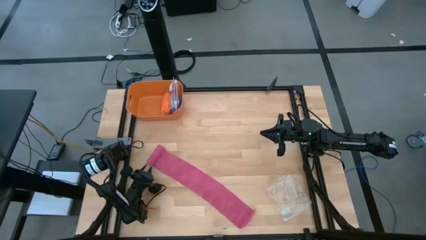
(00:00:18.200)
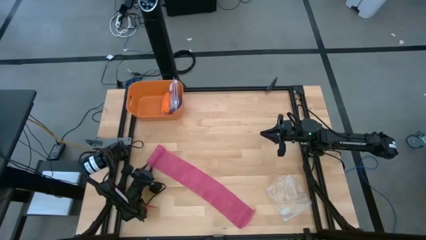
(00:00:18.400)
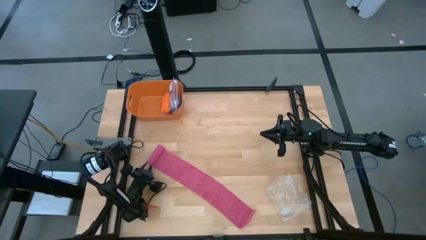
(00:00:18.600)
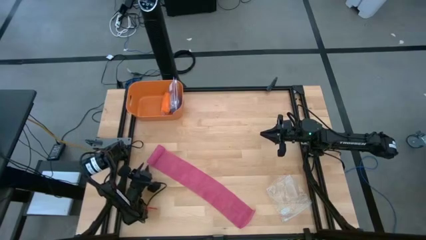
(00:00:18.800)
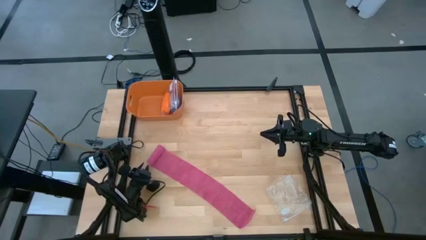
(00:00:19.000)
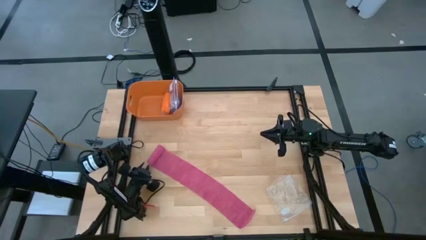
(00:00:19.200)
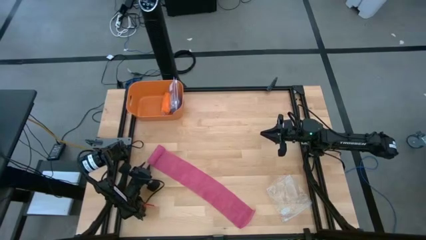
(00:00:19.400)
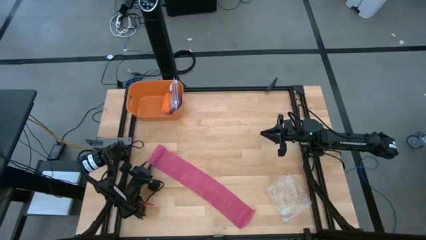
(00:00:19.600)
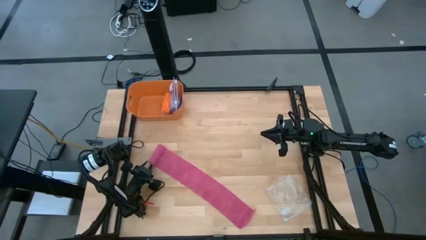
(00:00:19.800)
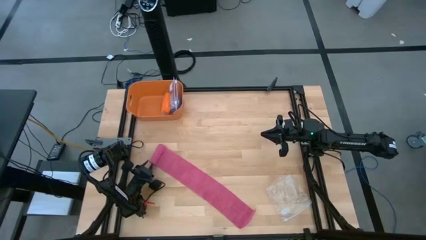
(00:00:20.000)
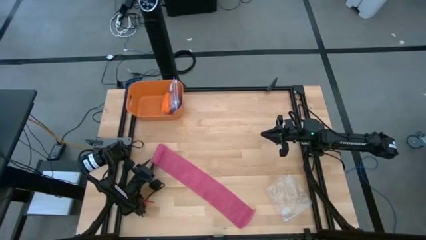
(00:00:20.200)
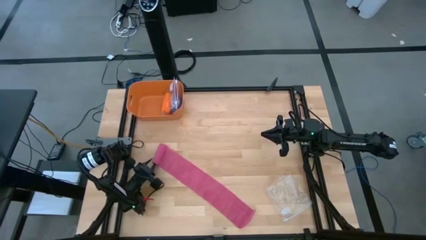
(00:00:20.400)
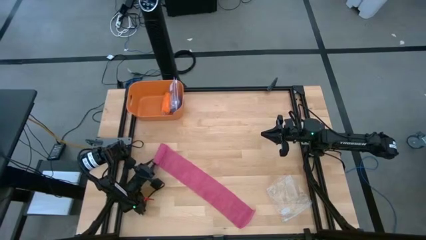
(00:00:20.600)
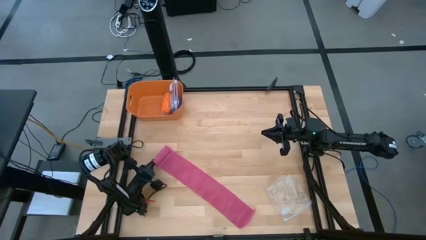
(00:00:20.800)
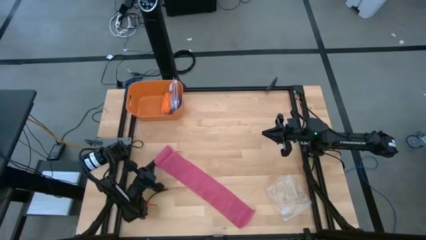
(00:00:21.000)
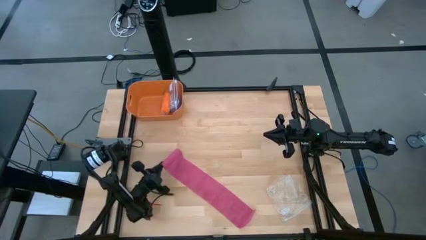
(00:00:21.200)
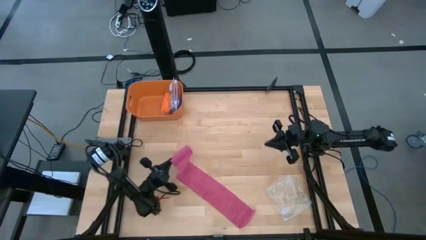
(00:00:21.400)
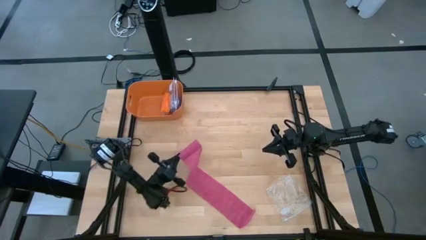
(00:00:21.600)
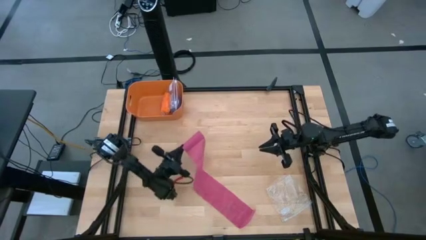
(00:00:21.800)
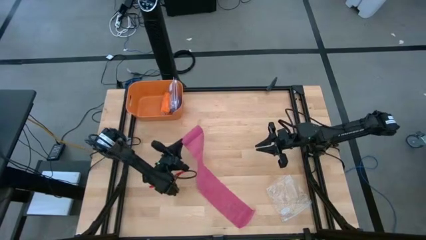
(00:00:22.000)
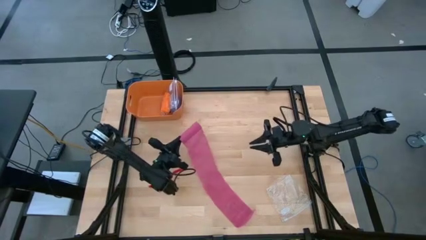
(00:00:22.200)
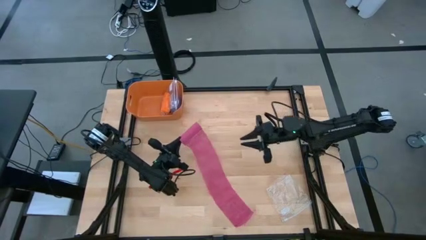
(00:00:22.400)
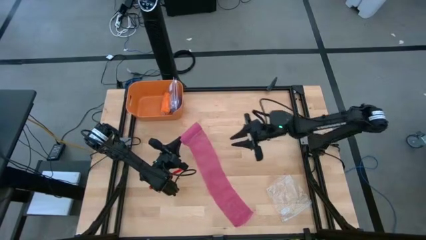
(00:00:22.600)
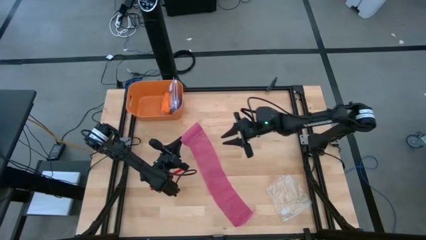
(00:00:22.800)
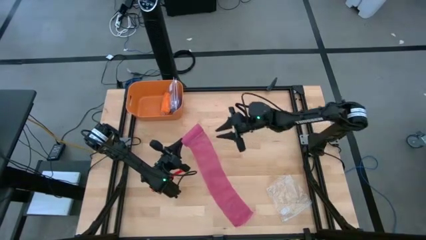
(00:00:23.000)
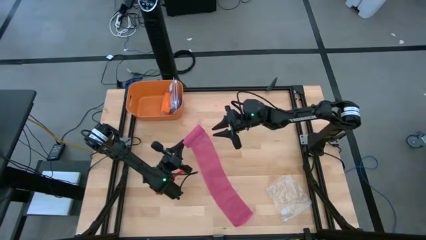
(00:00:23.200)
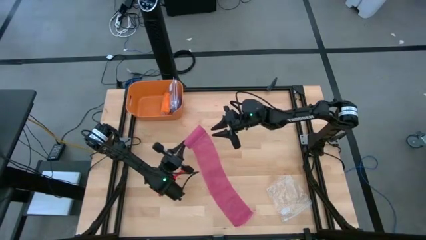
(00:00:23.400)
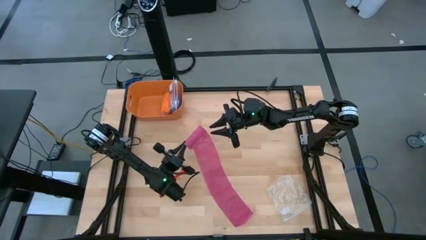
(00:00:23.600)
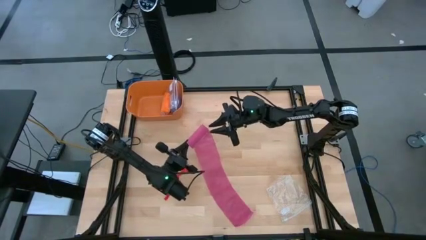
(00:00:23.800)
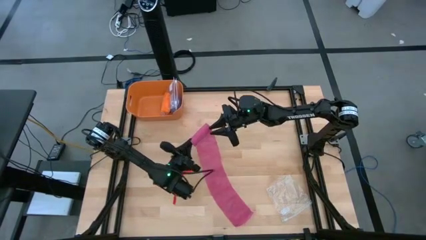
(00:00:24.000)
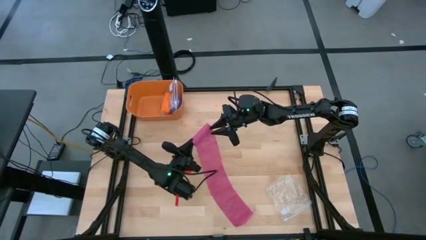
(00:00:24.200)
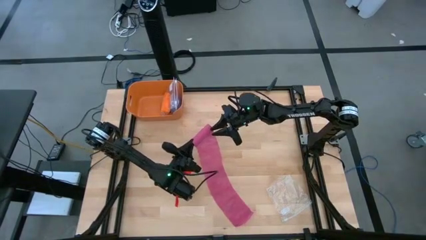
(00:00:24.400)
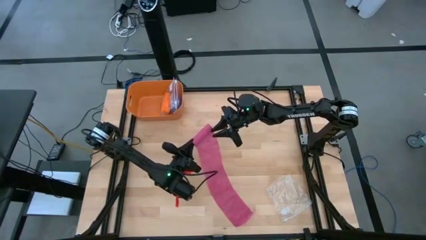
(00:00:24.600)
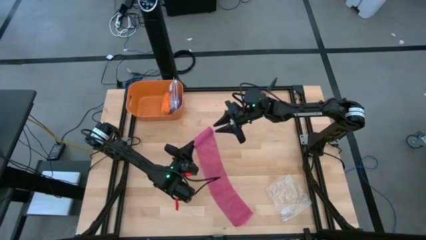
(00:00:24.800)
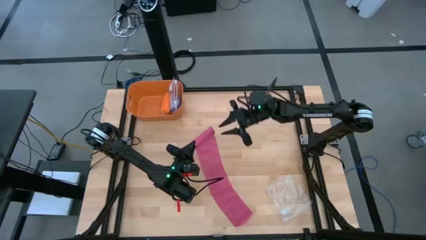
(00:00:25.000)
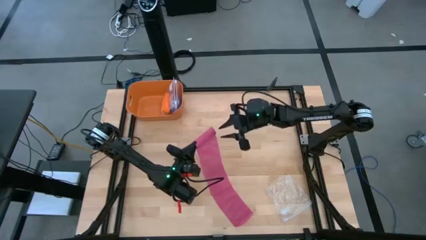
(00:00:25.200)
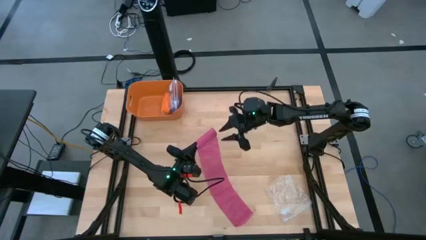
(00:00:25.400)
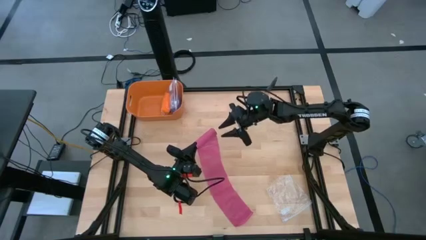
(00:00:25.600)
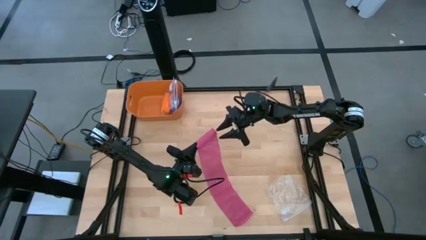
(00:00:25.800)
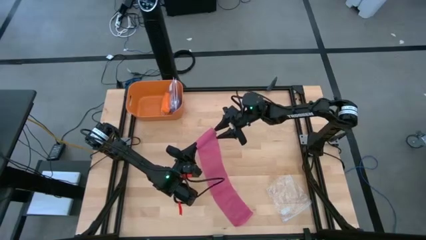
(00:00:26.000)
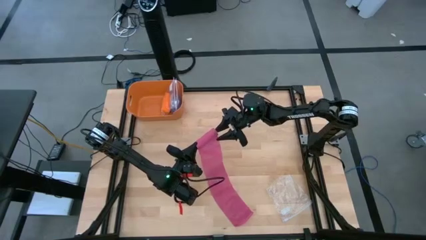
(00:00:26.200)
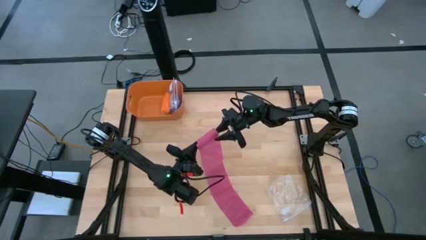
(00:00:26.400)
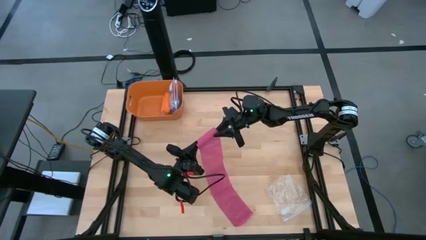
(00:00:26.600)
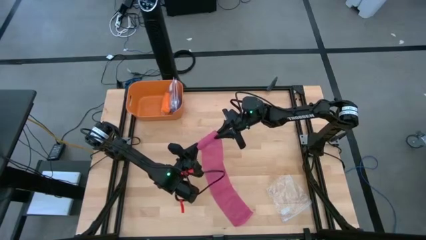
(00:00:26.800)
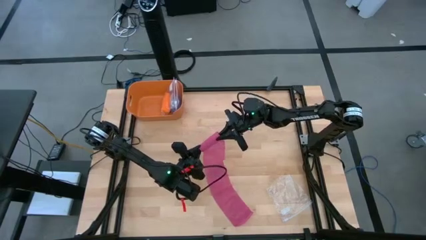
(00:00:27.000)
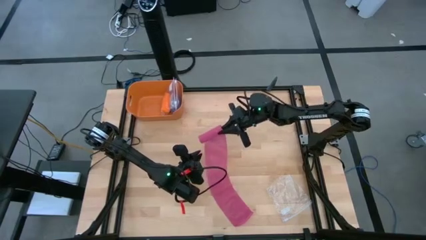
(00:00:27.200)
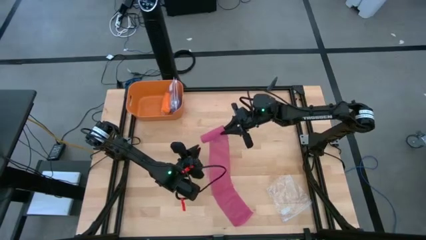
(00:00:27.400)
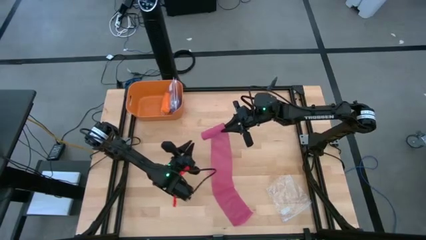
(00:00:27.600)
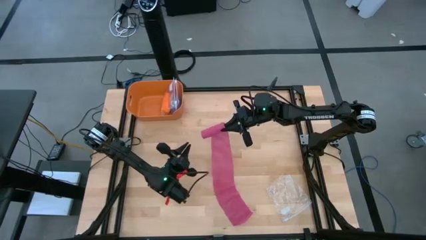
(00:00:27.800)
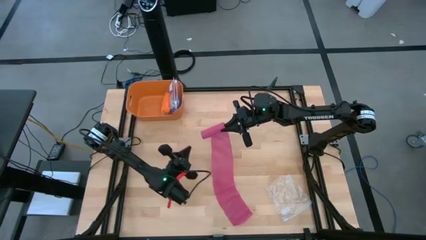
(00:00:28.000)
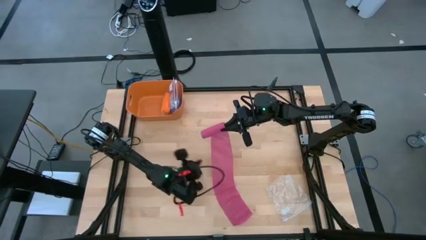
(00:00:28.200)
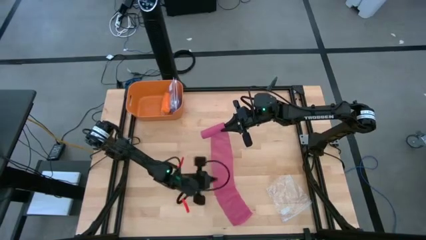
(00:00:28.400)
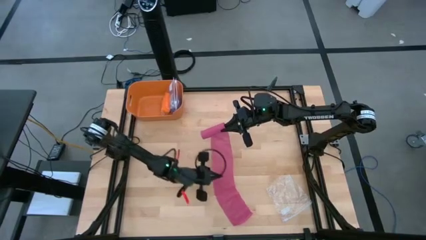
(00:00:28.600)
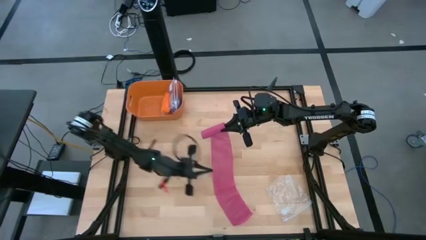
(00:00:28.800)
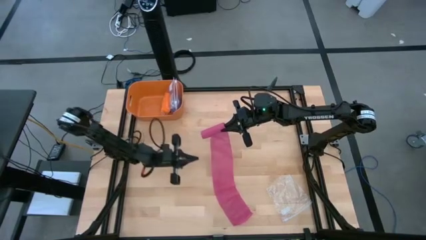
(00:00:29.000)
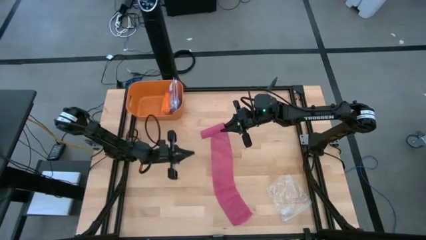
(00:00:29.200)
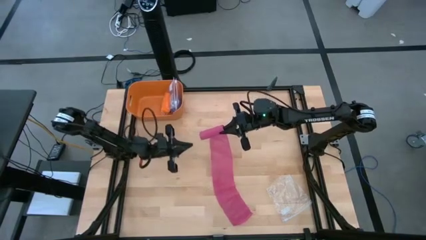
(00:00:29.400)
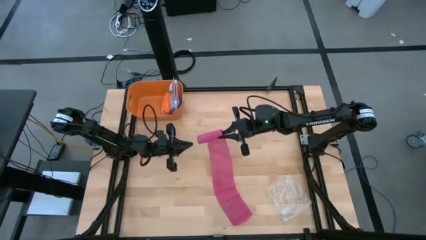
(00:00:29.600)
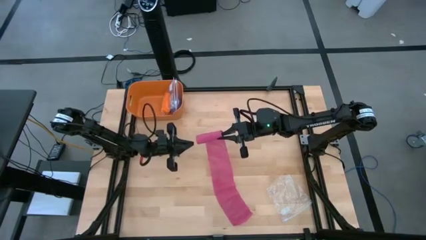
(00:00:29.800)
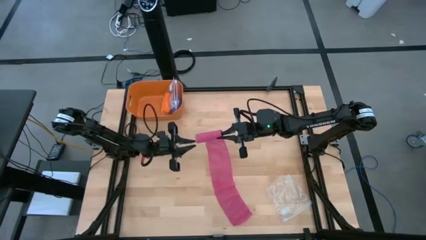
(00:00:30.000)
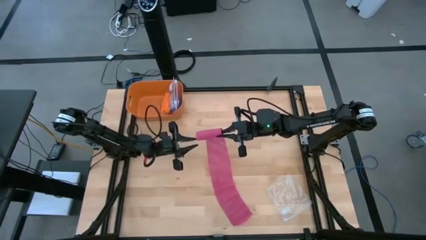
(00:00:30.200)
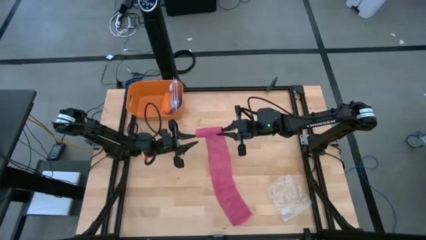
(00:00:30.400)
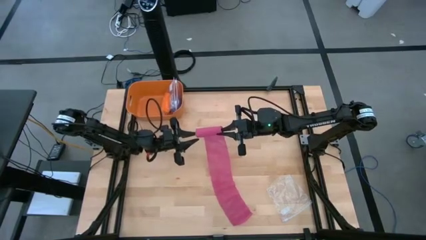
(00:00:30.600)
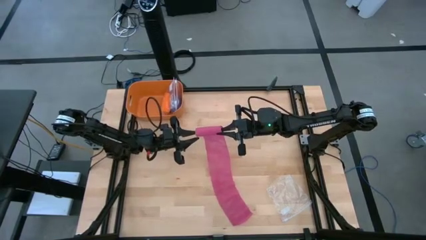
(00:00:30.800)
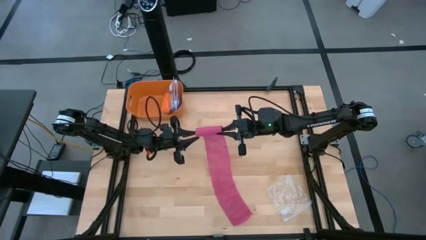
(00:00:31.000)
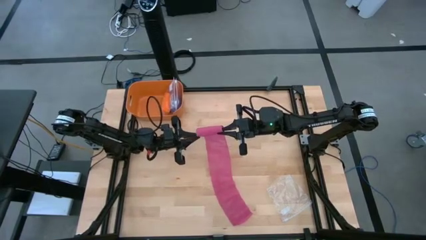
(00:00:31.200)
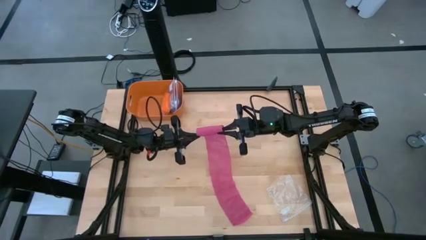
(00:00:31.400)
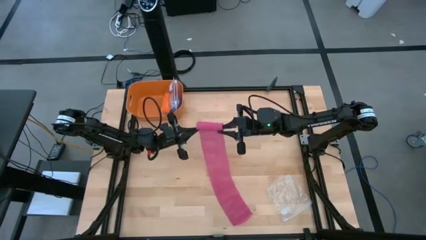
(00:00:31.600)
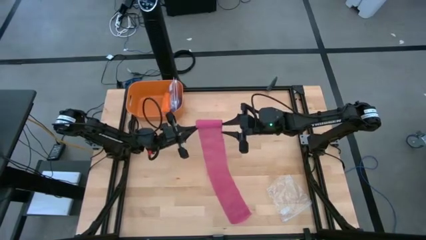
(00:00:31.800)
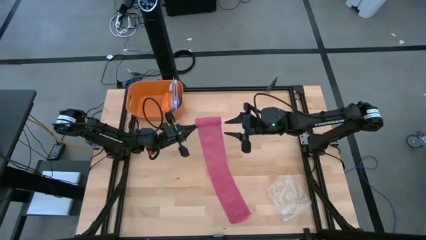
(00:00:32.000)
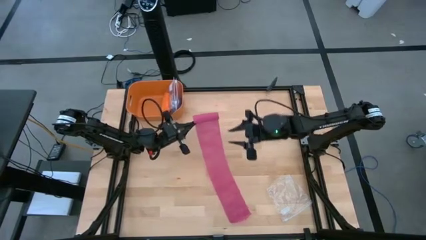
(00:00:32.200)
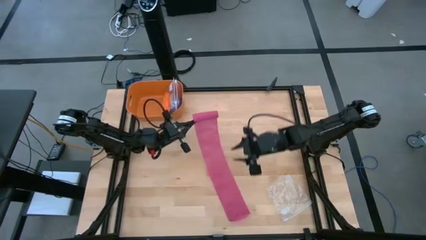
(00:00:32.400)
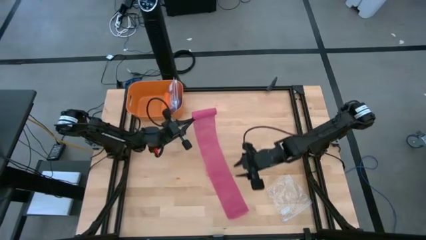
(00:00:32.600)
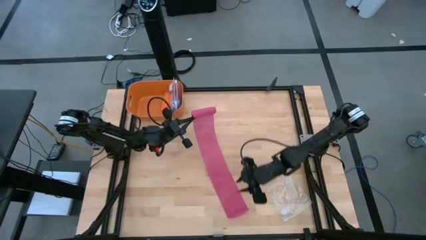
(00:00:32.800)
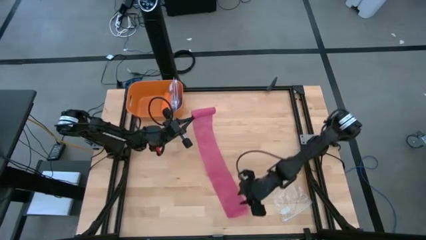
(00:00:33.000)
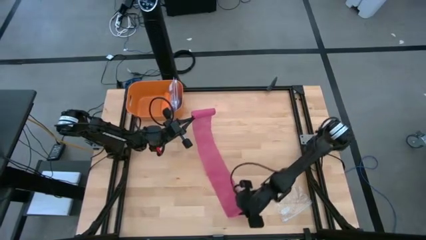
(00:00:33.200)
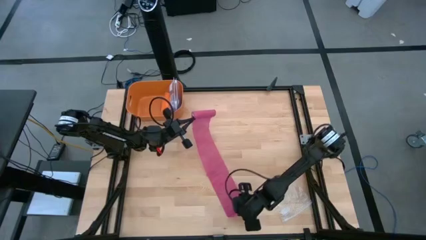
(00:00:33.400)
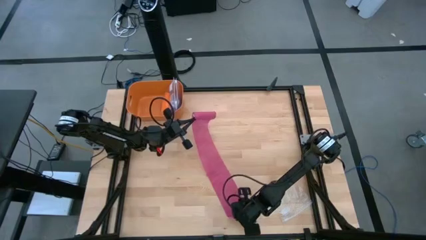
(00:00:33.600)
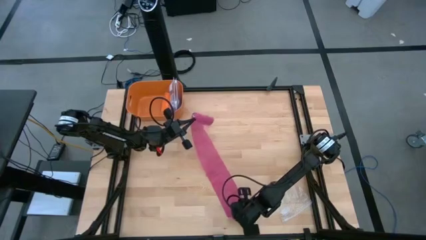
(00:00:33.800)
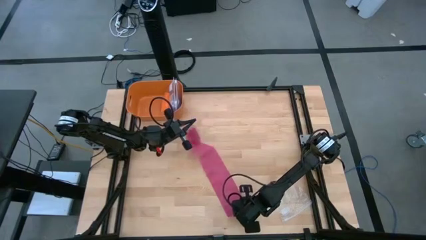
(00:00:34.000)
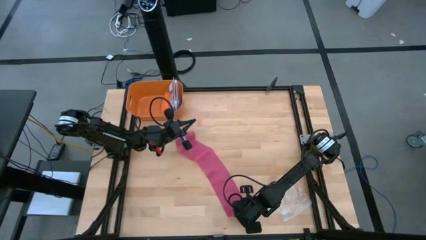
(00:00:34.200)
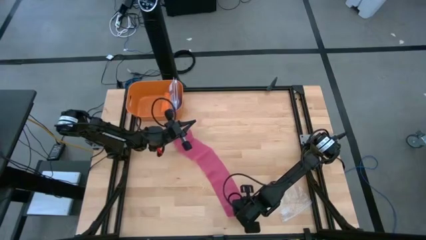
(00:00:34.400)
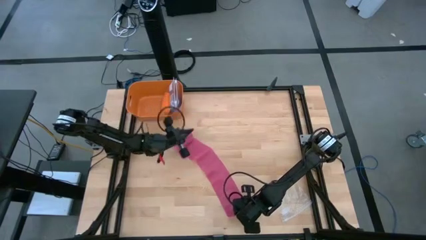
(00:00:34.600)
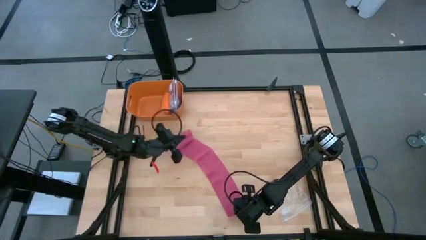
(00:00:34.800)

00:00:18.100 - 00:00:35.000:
Task: Roll bandage
Roll the pink bandage
